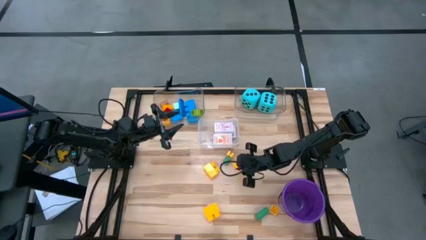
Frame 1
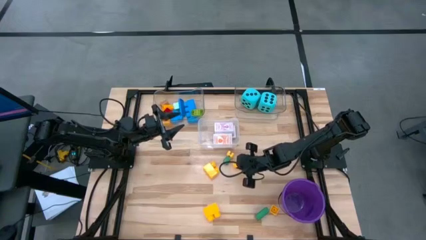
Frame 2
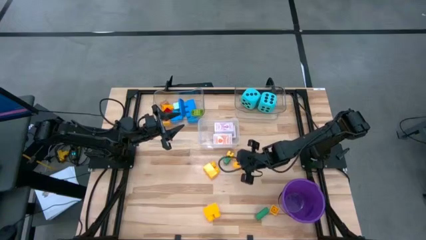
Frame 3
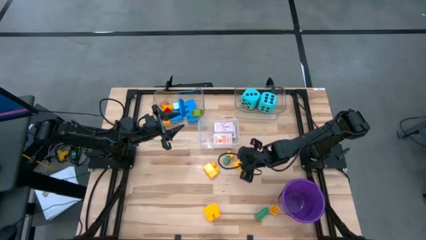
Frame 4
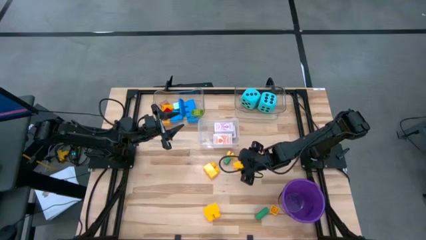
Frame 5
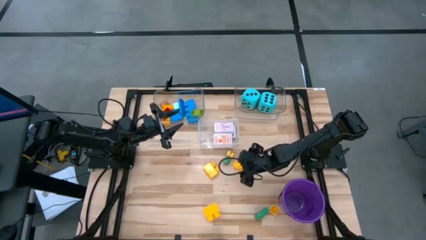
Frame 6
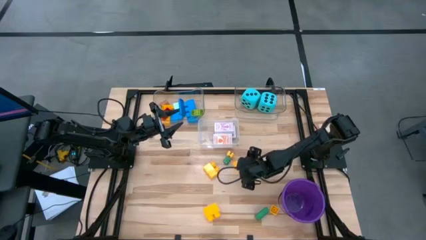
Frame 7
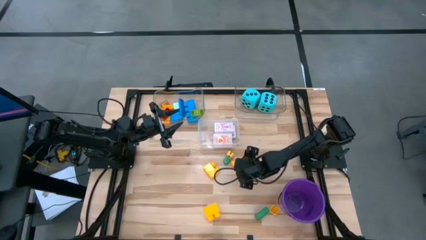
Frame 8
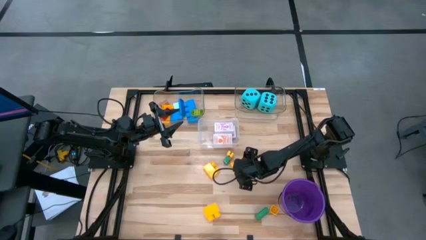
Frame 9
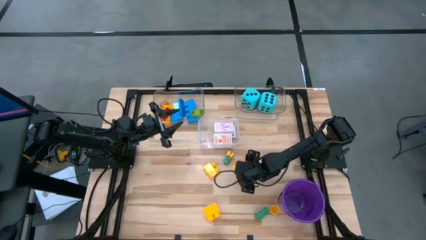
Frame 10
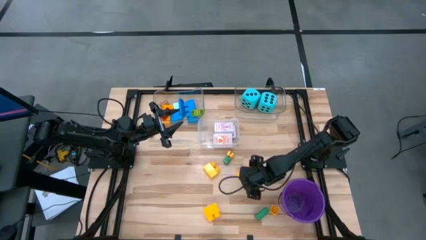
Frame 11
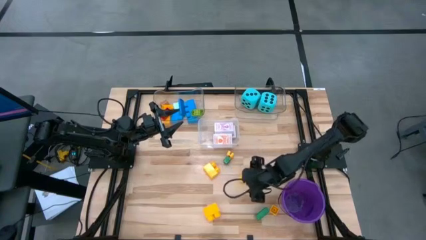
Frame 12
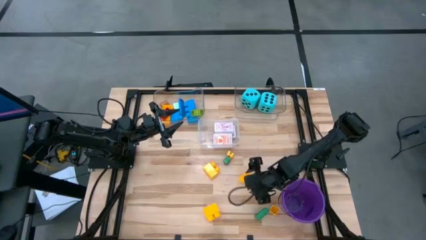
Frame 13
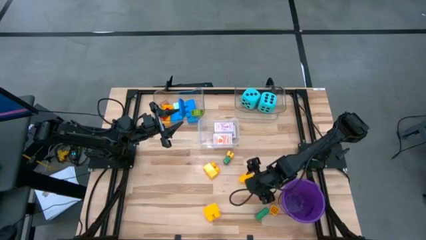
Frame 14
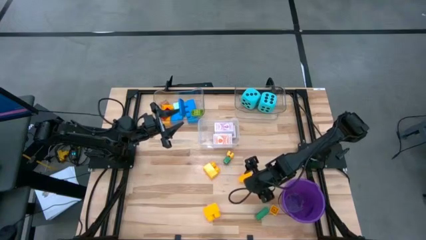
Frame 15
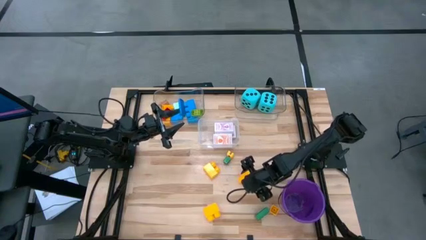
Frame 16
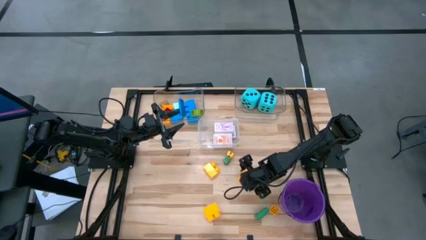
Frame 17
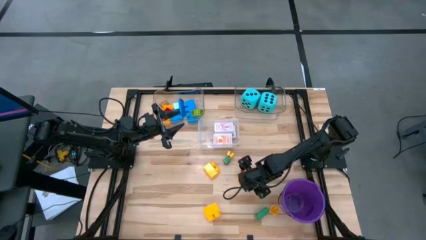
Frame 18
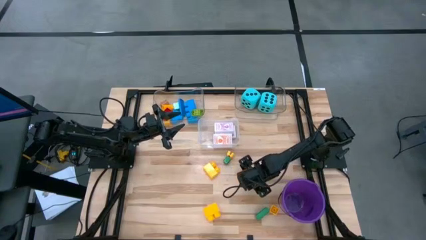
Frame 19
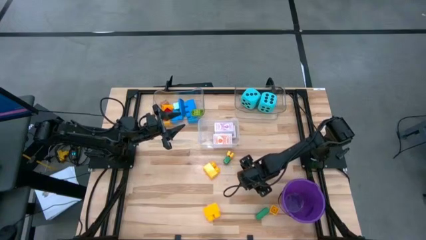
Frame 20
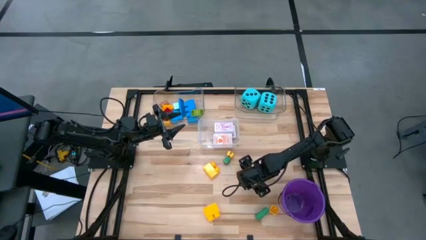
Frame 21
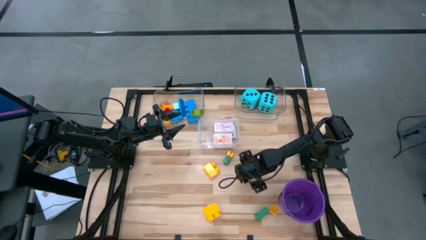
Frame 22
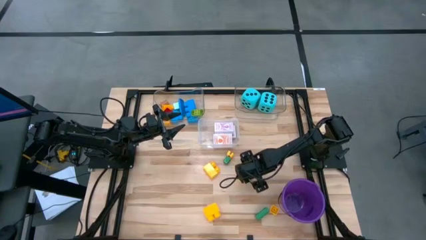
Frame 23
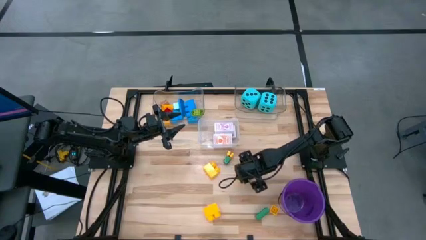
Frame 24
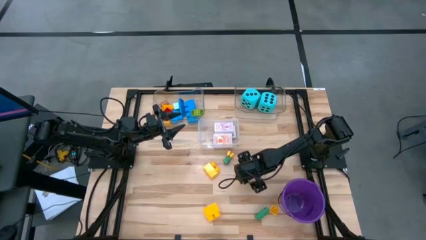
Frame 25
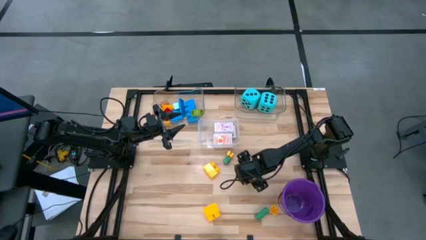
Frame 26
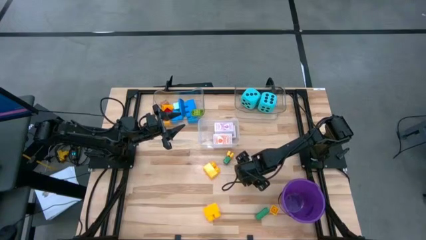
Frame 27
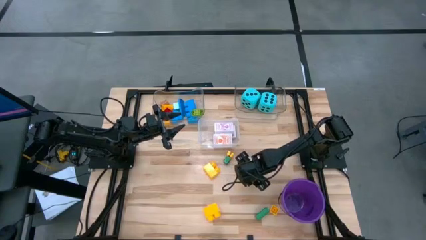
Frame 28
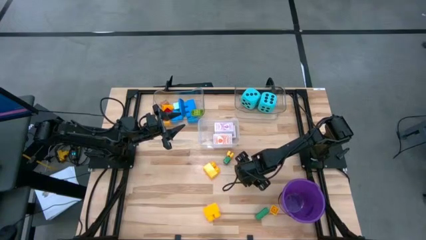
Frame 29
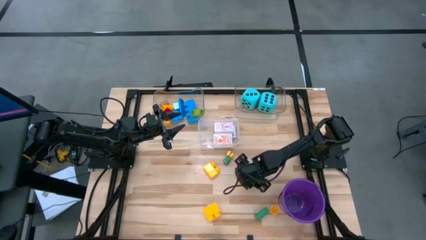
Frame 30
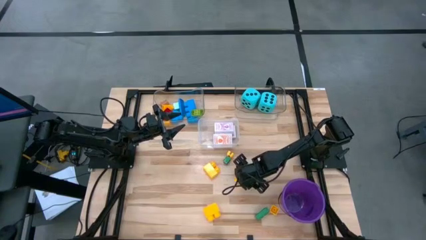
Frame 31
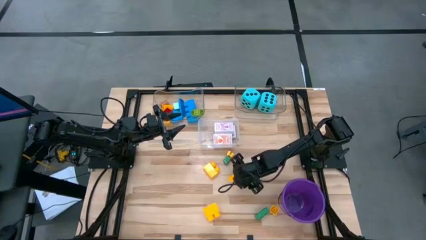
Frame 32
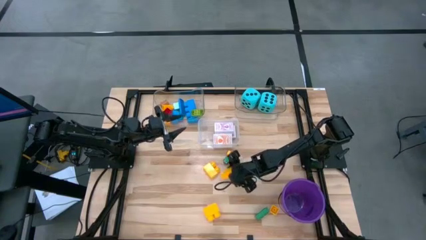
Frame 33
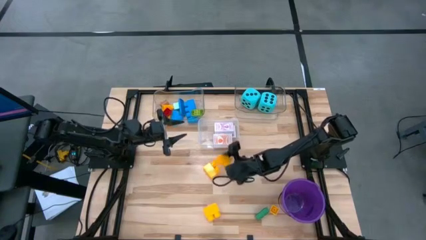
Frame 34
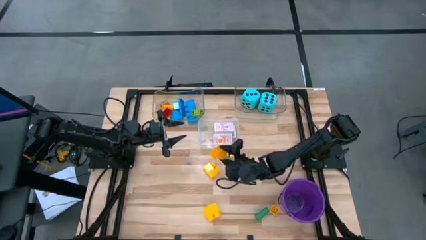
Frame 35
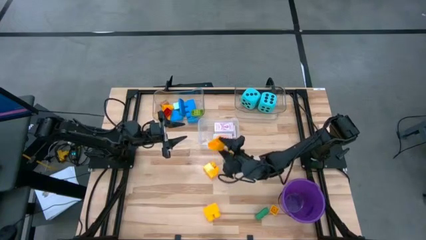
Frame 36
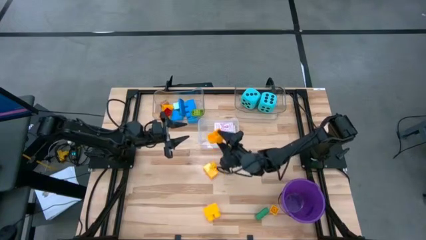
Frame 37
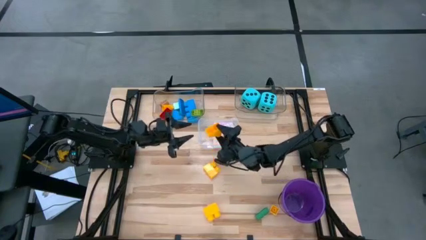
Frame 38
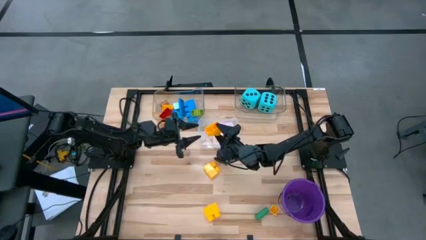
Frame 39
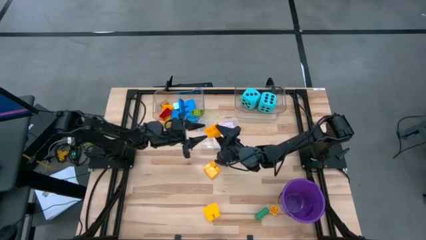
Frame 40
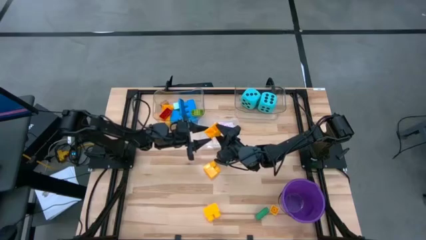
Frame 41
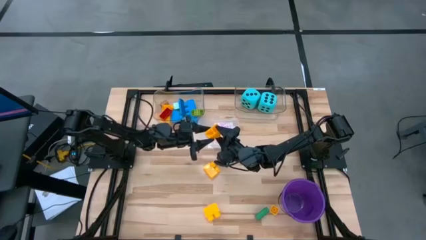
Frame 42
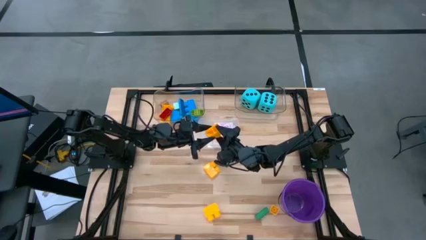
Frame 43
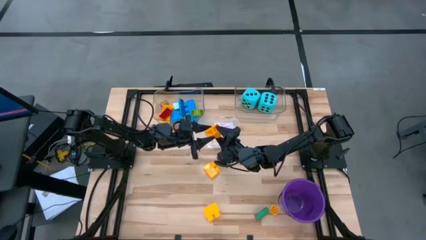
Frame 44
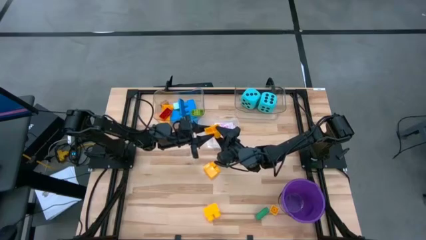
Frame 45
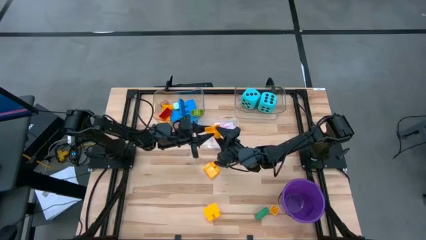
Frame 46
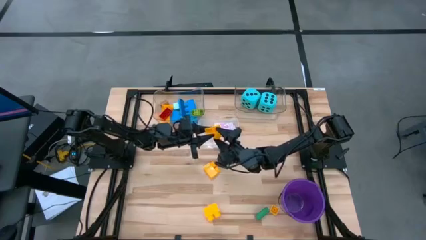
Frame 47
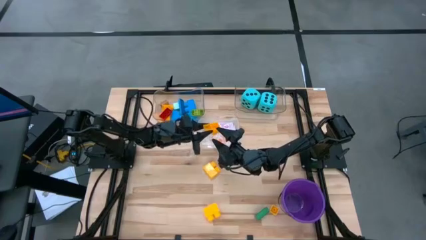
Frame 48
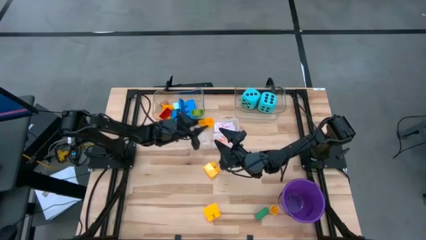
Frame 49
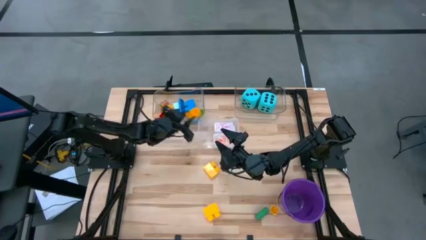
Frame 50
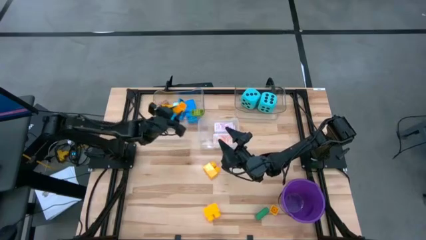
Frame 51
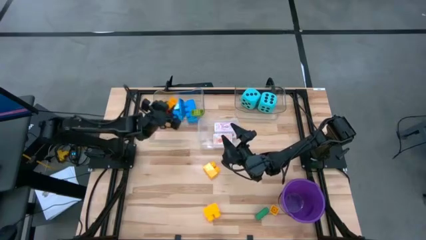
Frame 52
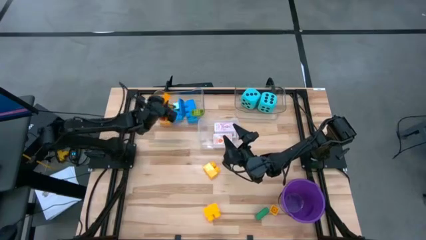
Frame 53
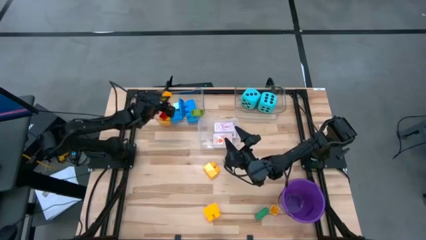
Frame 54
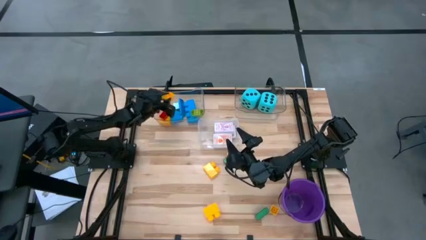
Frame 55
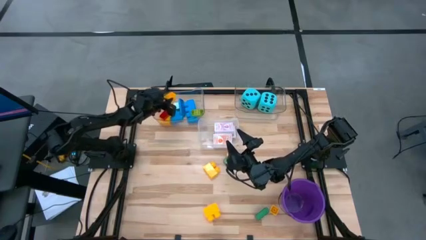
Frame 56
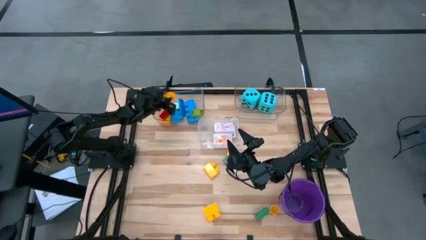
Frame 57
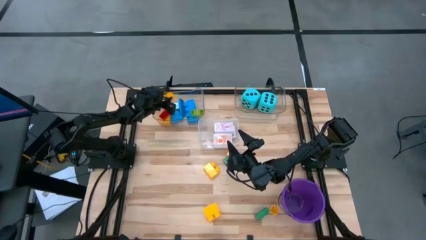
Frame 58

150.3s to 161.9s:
Task: Pick & Place Toys
Put the yellow game piece into the top left transparent bin

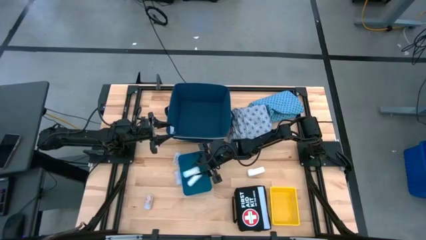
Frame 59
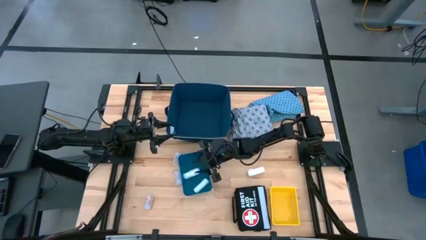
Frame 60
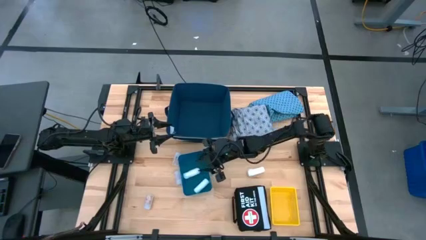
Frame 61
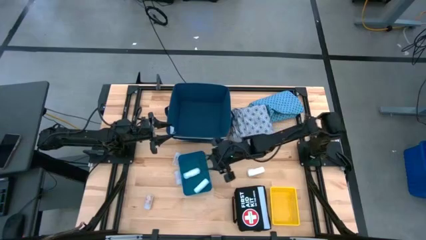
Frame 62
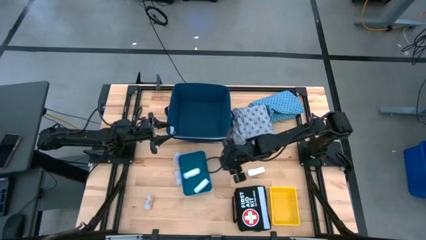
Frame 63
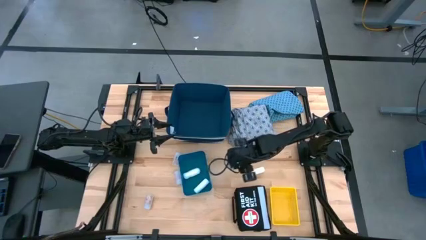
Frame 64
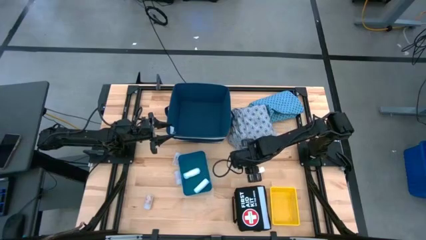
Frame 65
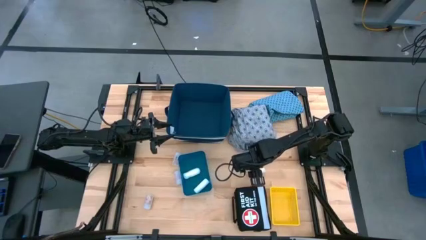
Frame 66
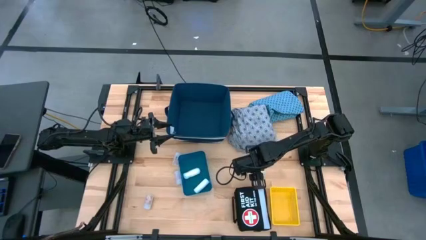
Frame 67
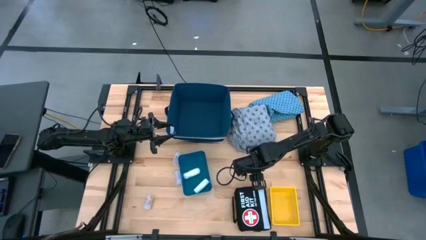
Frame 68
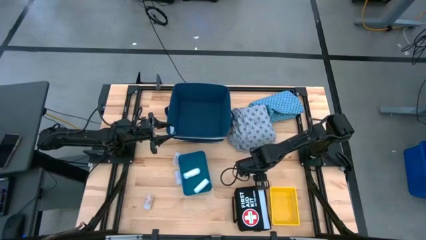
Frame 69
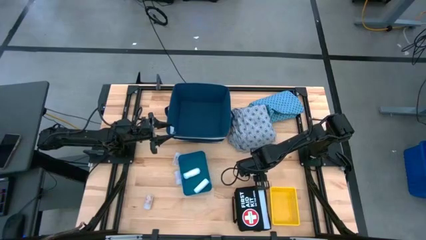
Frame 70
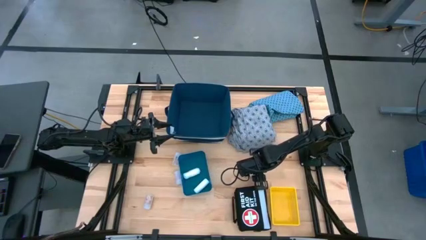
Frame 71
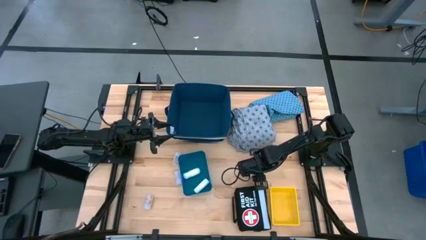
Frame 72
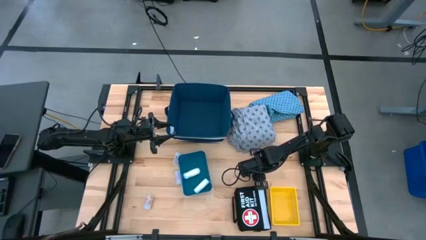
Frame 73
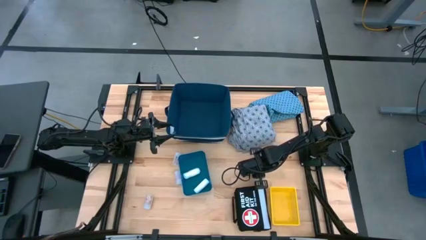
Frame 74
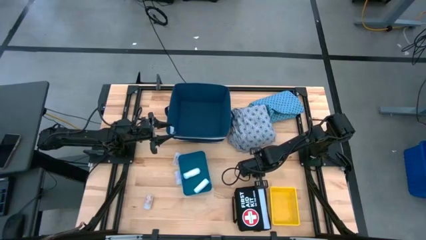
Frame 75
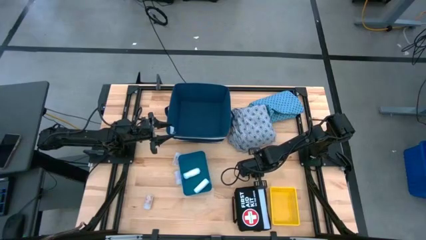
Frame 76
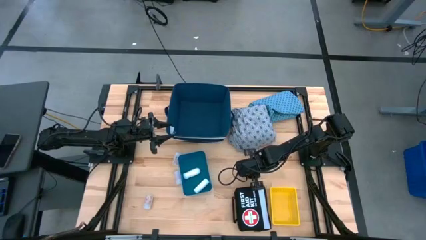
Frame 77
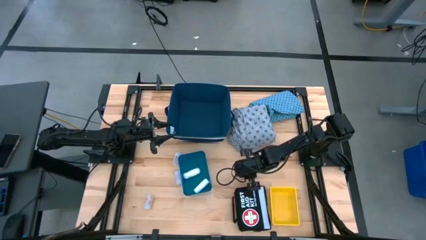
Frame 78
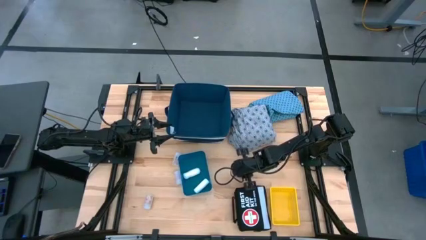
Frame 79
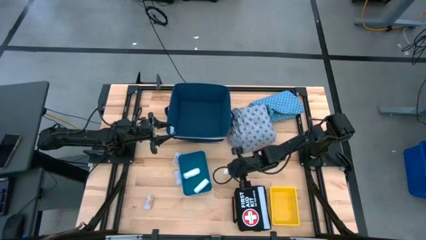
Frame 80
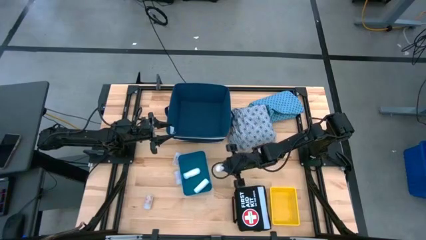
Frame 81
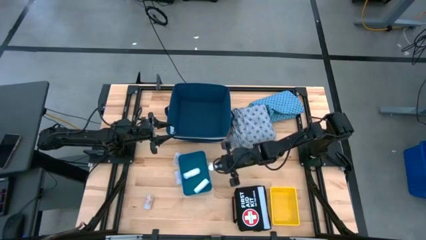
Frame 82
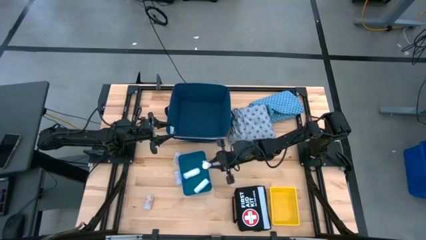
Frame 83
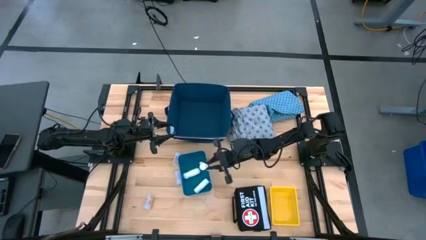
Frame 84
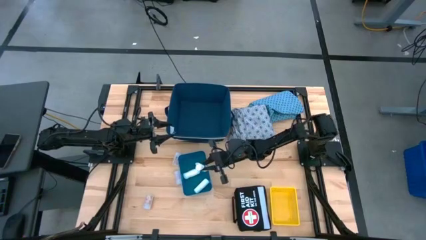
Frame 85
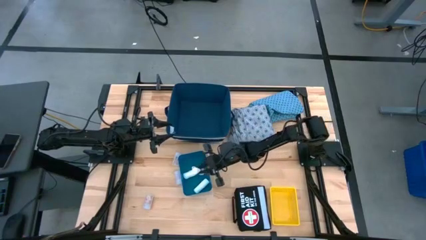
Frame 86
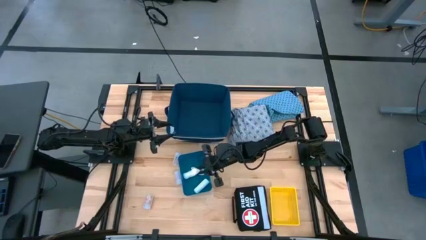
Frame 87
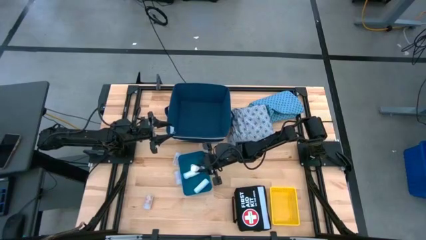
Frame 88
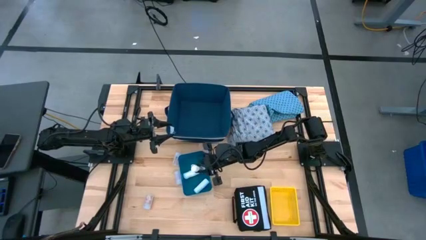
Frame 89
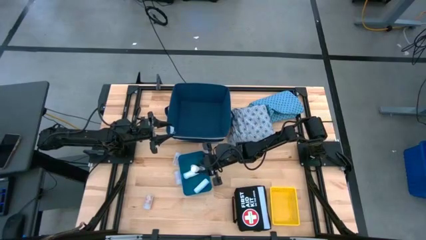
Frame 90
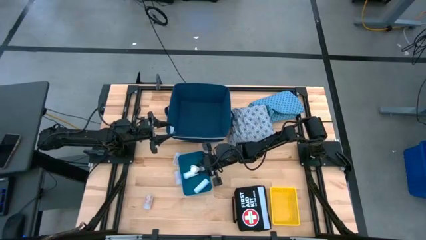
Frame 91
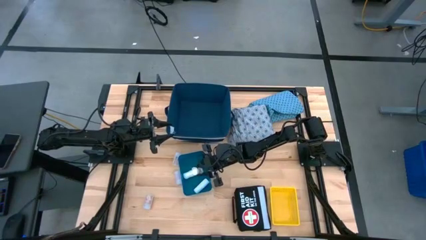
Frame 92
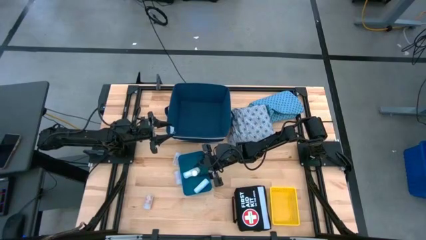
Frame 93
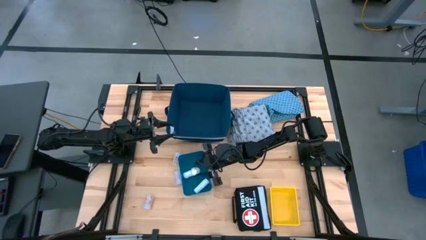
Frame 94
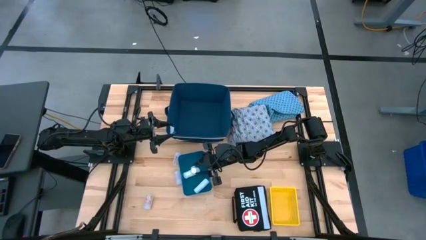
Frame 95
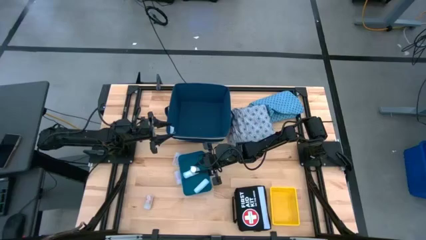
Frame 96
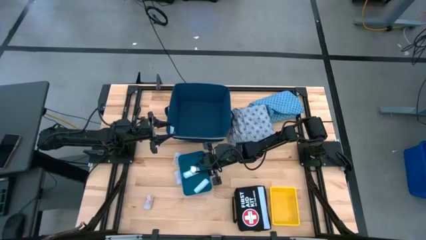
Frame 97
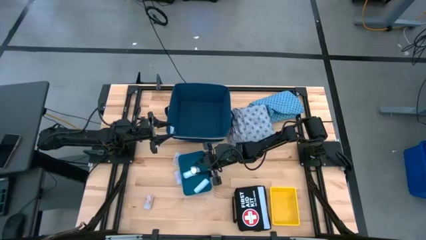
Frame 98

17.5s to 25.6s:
Task: Pick & place medical supplies in basket/bin
Put the white gauze in the blue bin
